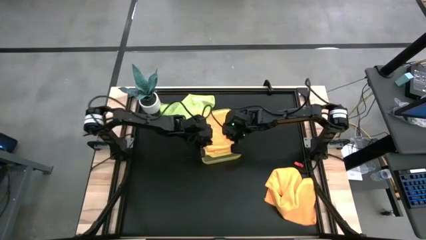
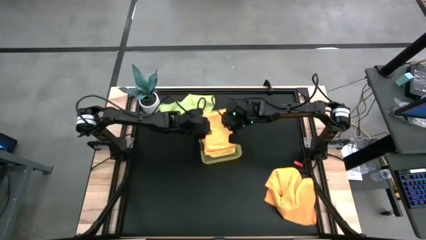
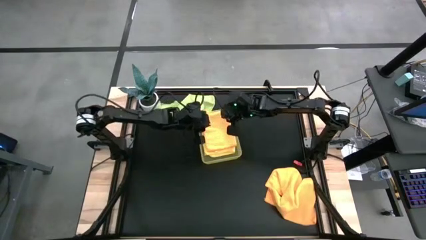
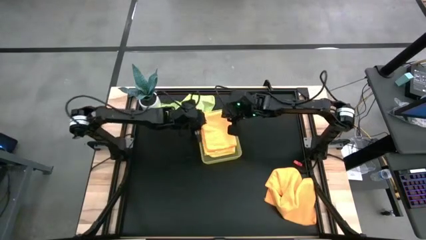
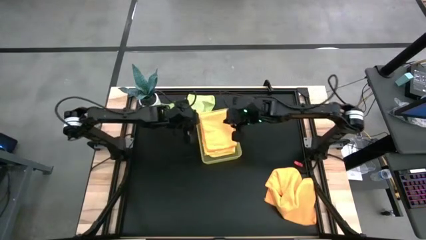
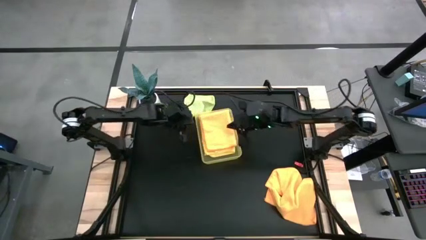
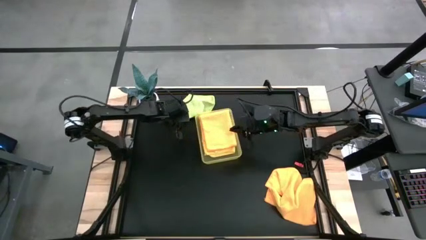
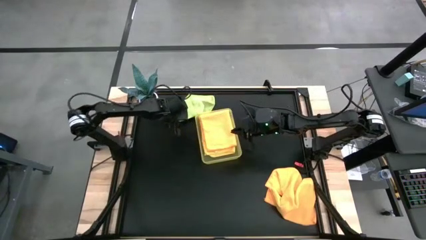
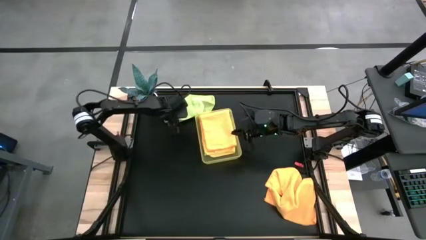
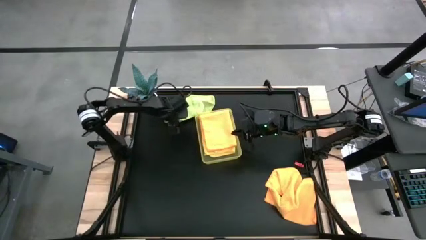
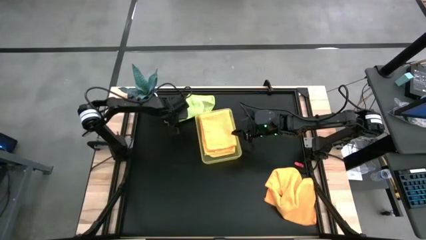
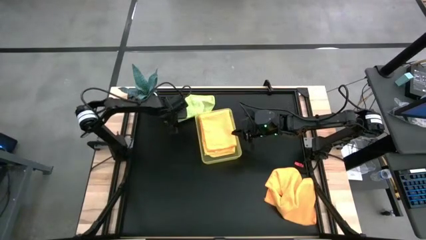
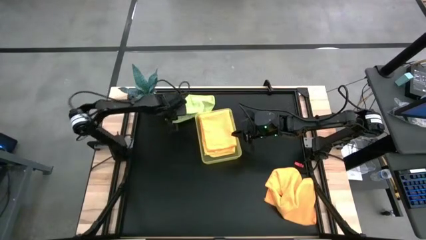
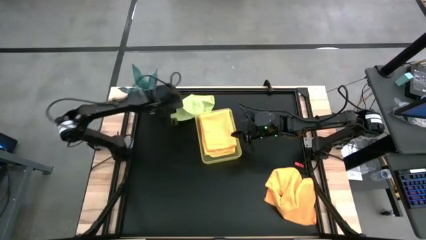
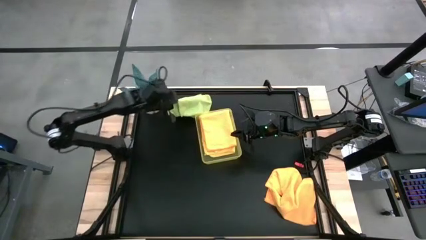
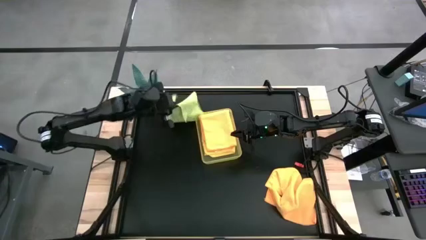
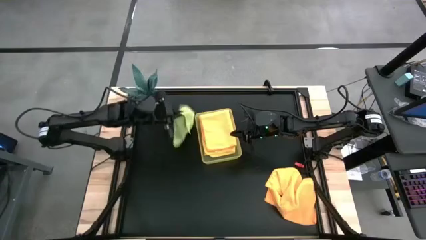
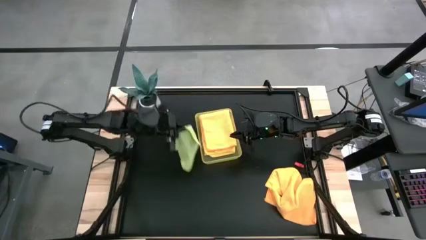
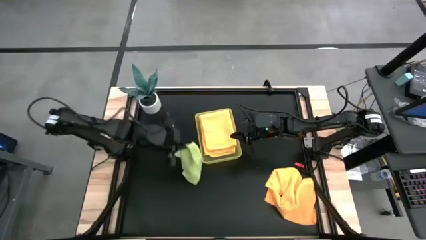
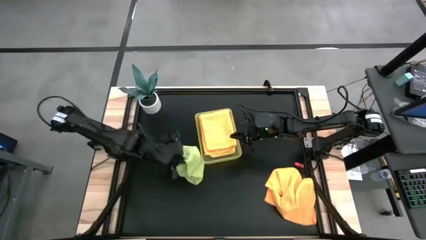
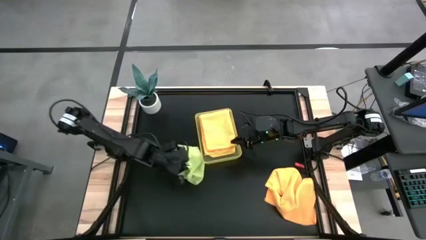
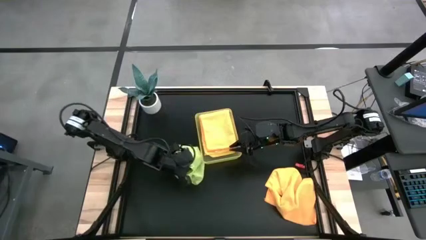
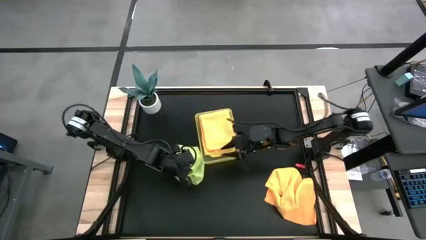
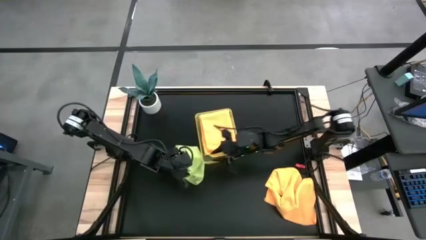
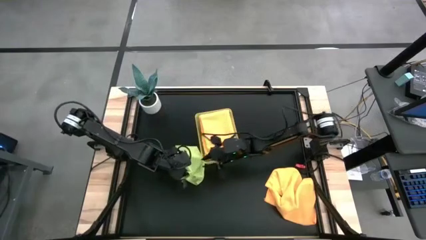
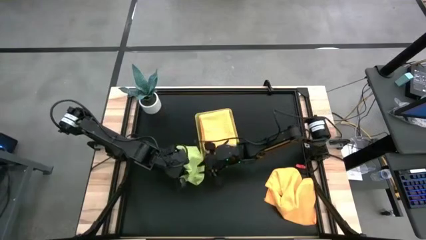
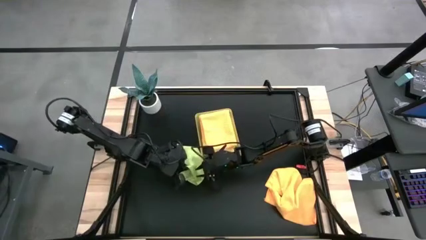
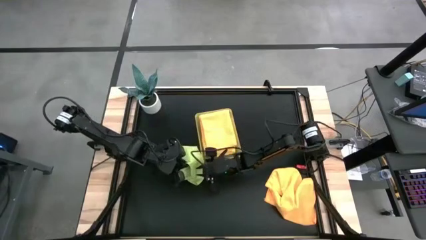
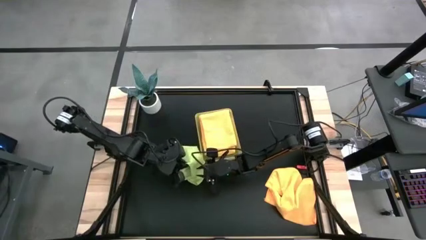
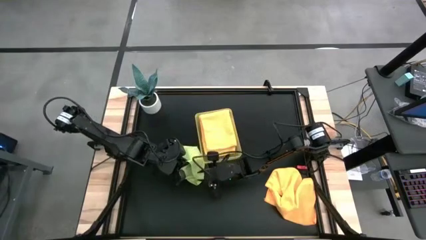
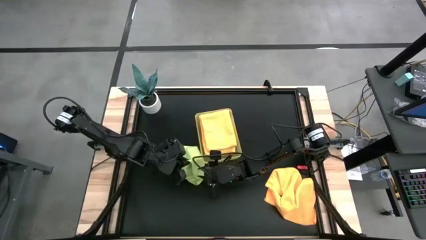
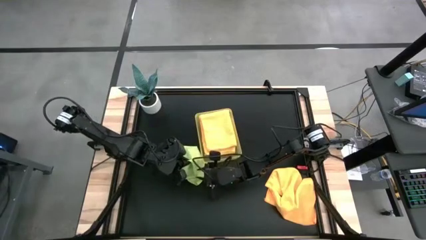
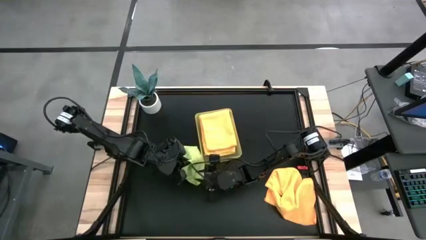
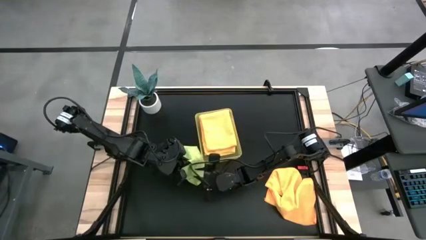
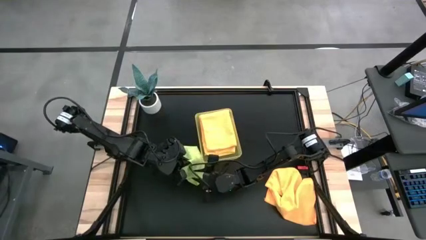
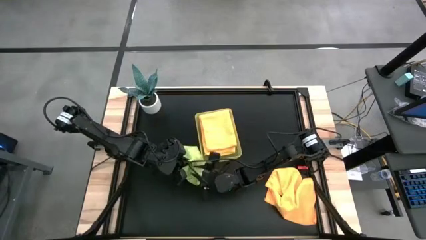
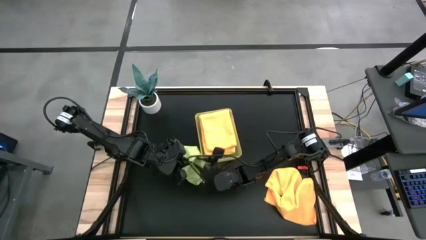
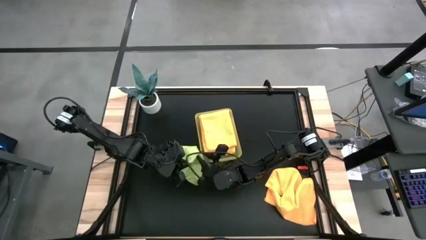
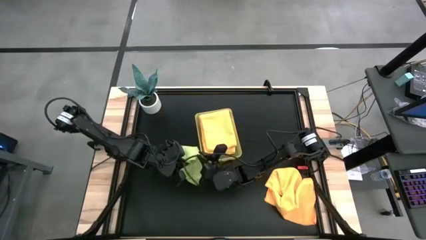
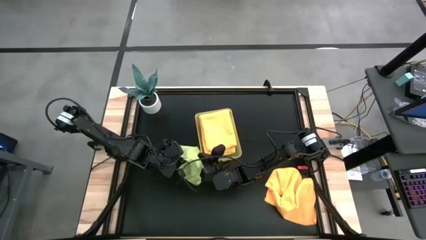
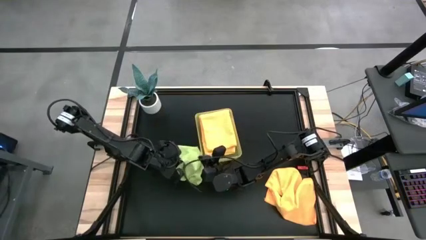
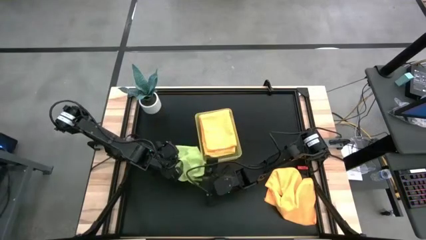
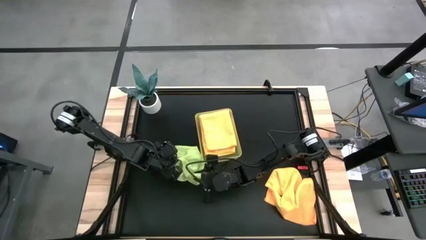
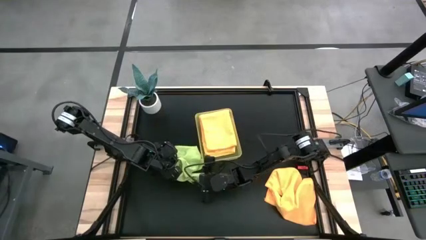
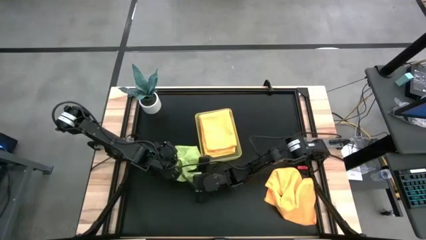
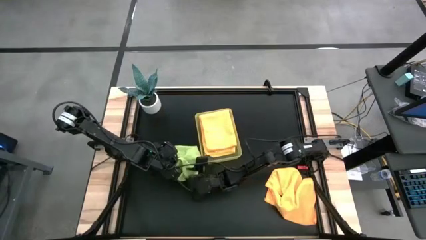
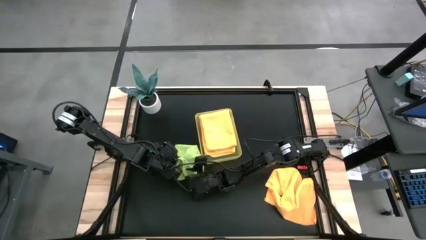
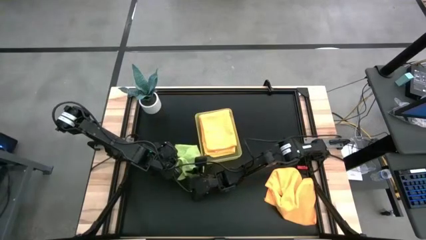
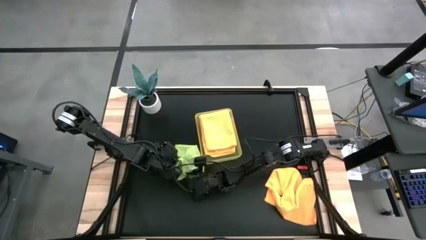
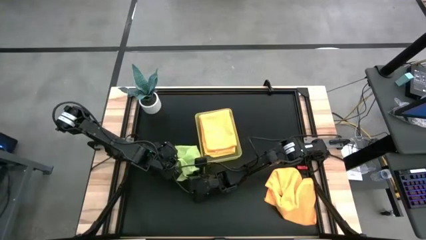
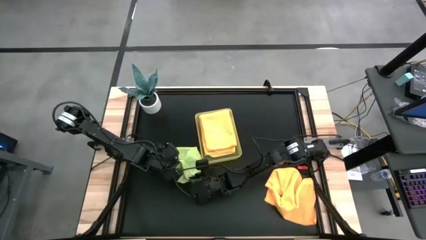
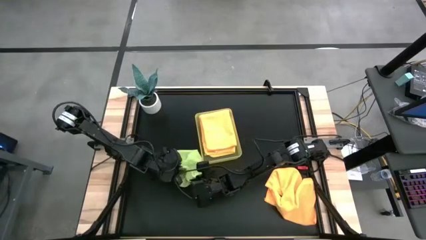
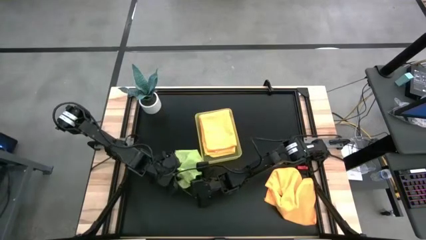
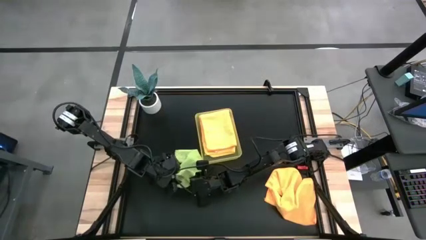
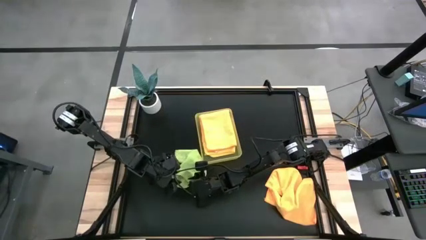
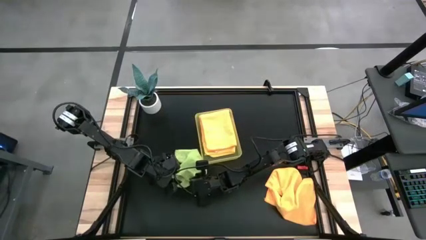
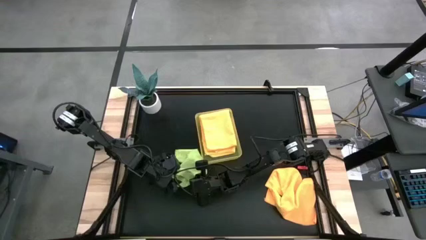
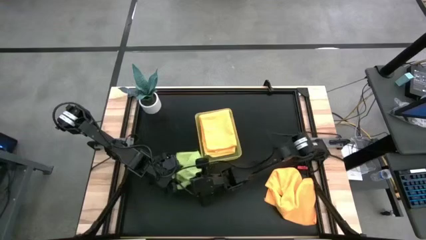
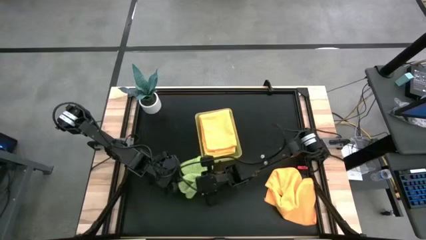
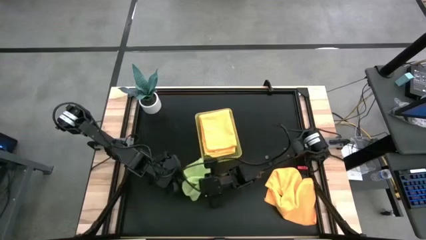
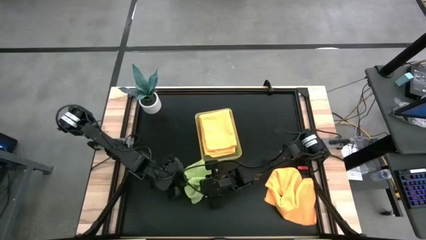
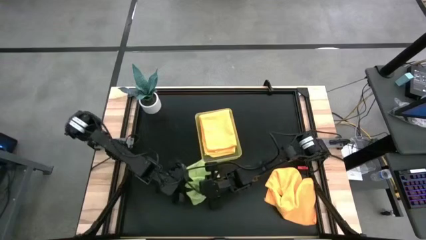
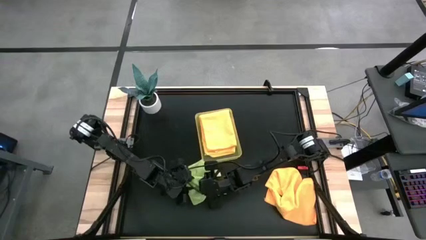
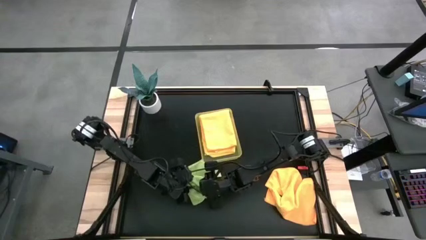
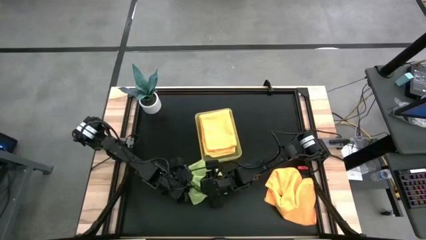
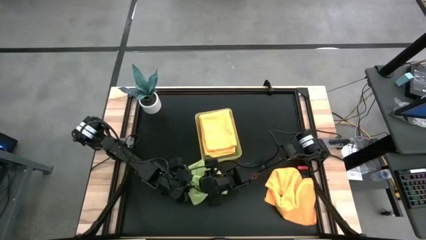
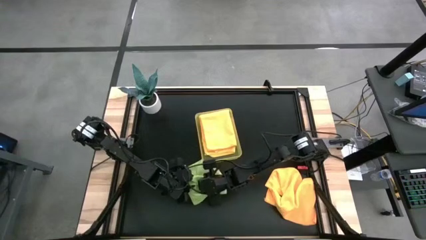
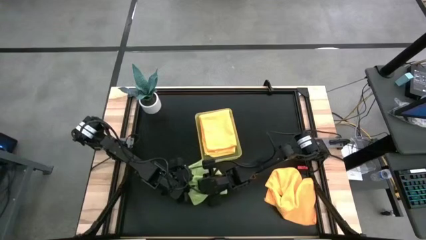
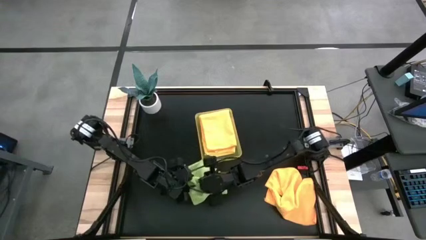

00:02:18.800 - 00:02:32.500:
Task: Fold microfiber towels
Fold the green microfiber cloth

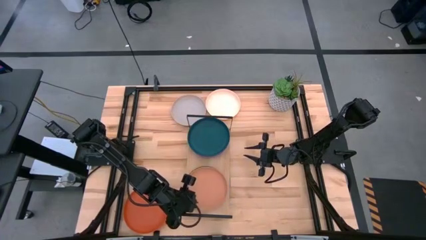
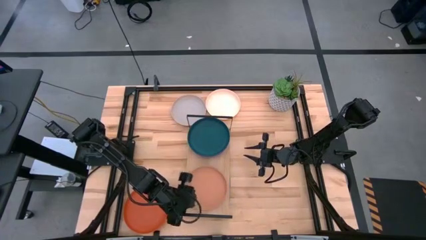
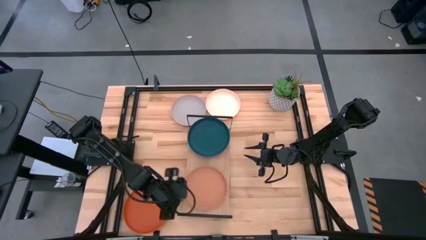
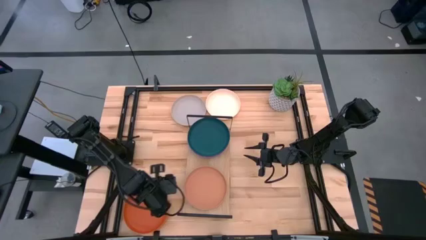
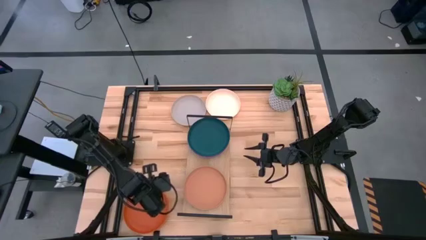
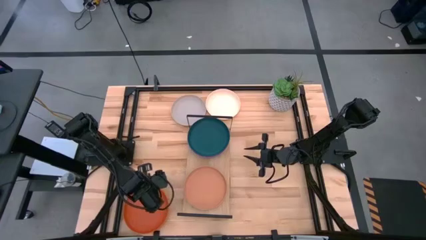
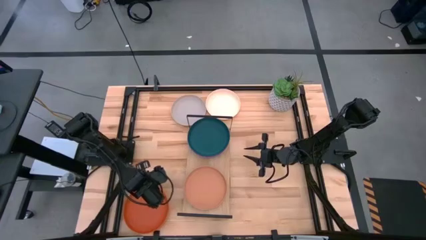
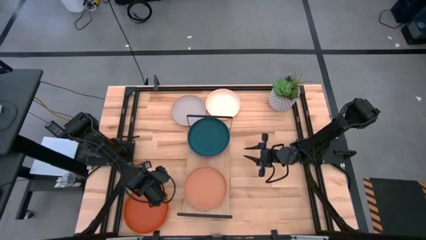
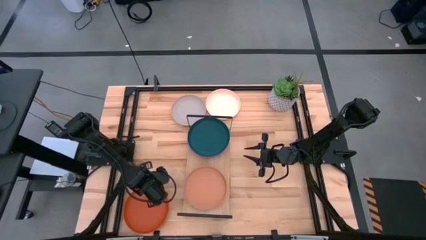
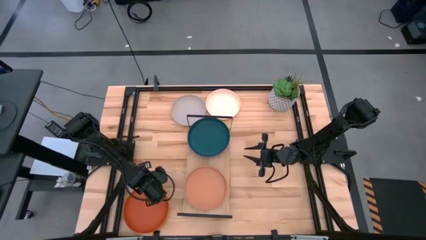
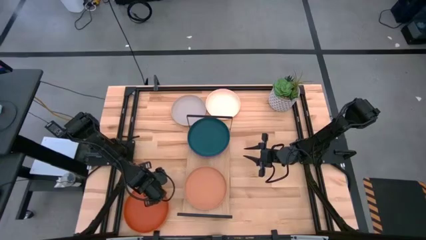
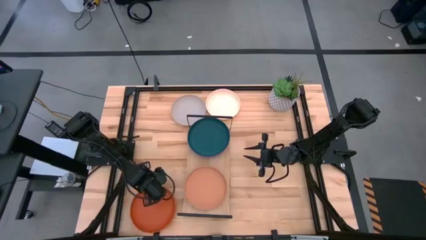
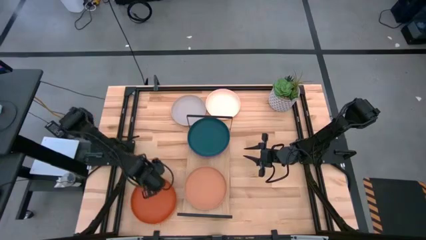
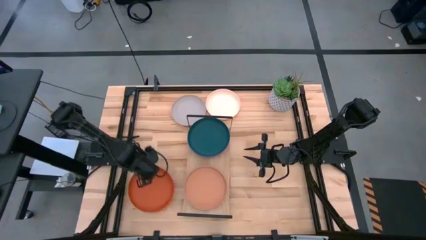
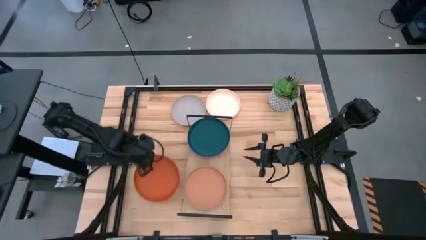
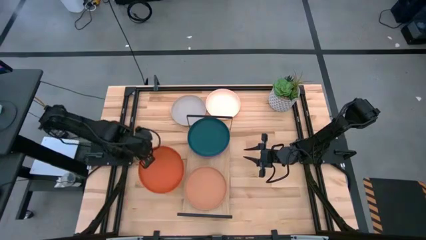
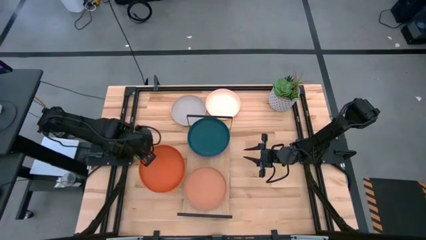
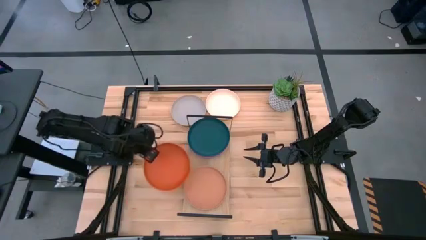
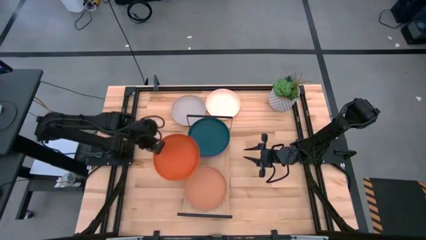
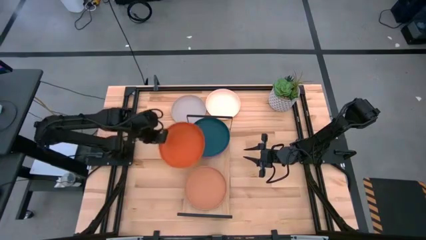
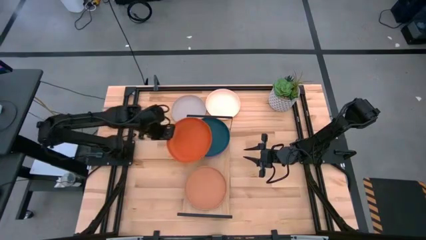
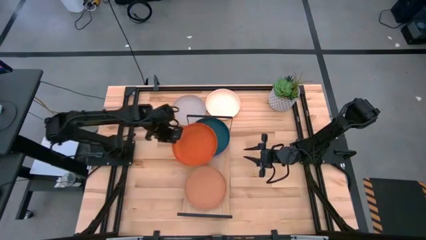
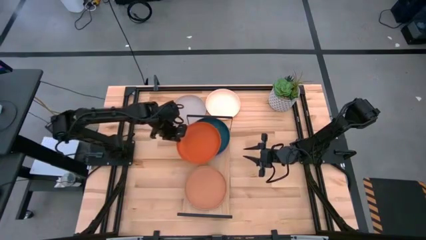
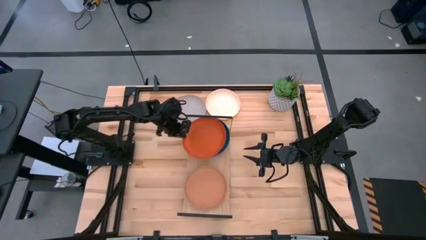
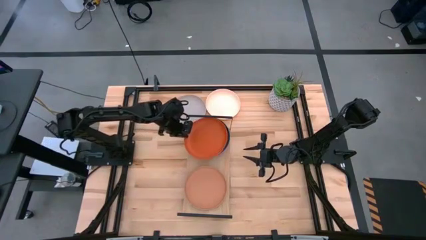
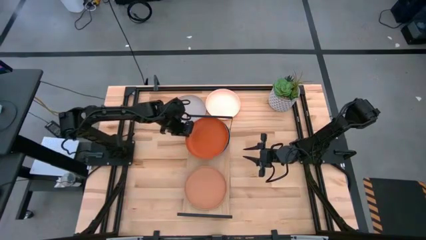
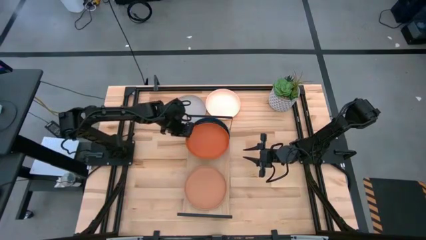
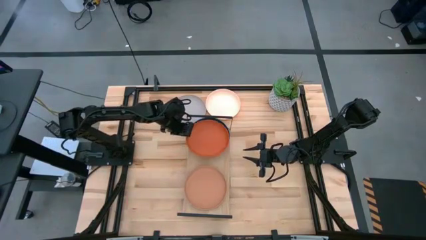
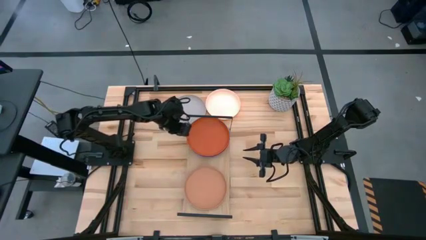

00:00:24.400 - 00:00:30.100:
Task: Place and stack plates onto a shelf
Stack the orange plate on top of the dark green plate on the shelf
